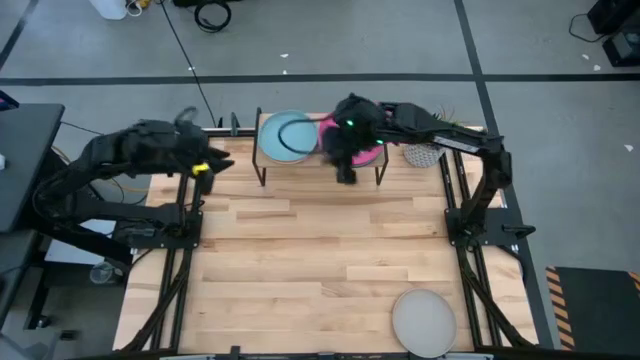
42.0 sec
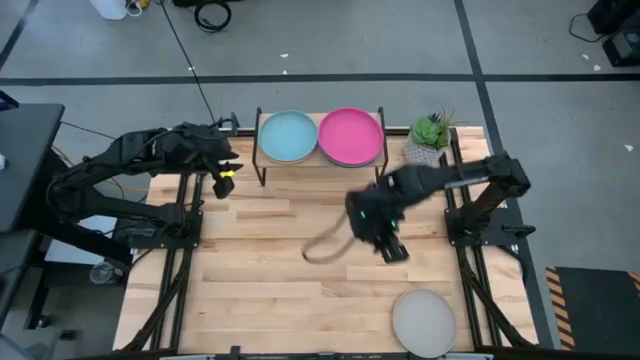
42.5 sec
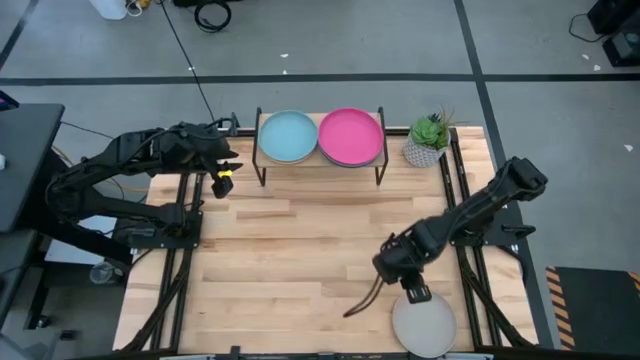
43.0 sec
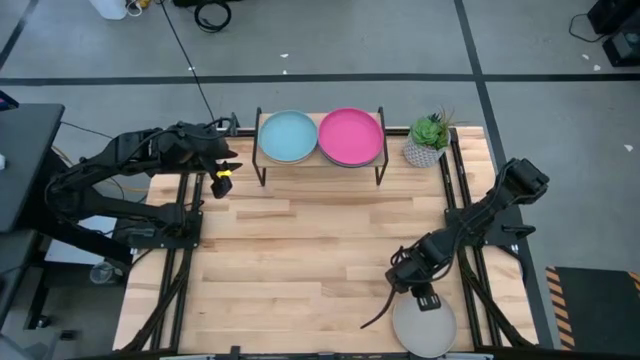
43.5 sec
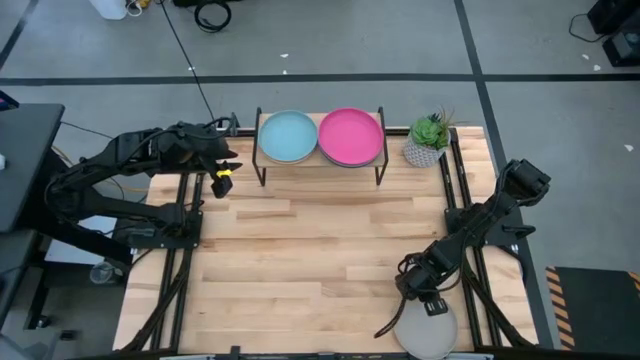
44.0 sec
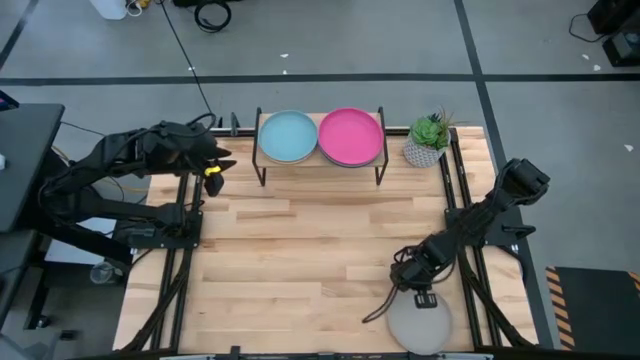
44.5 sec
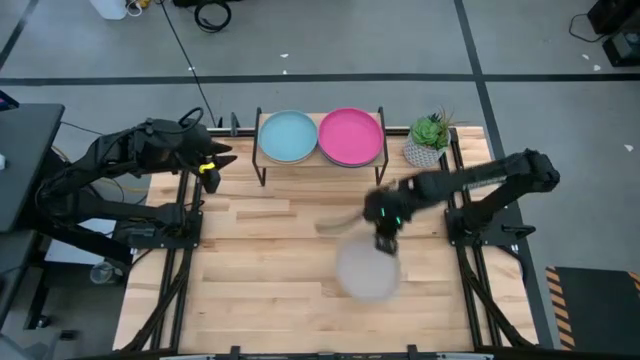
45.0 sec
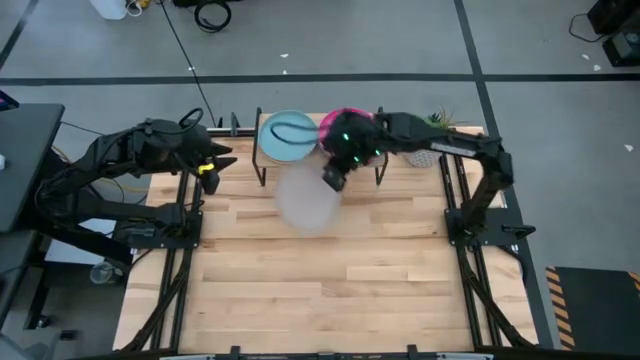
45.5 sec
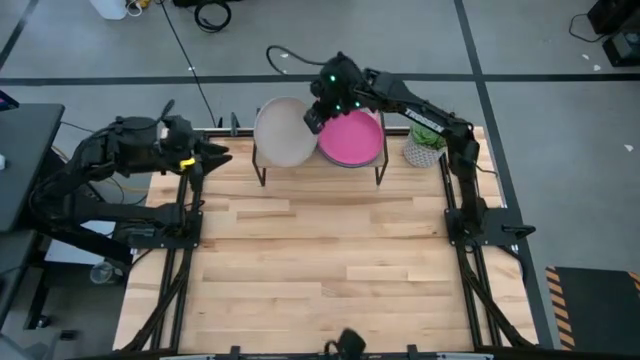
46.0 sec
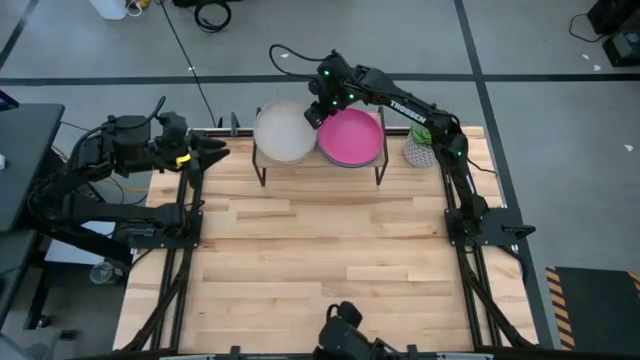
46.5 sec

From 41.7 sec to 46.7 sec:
Task: Place and stack plates onto a shelf
Stack the gray plate on top of the light blue plate on the shelf

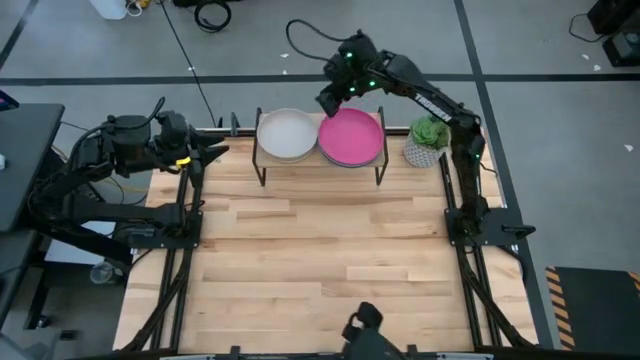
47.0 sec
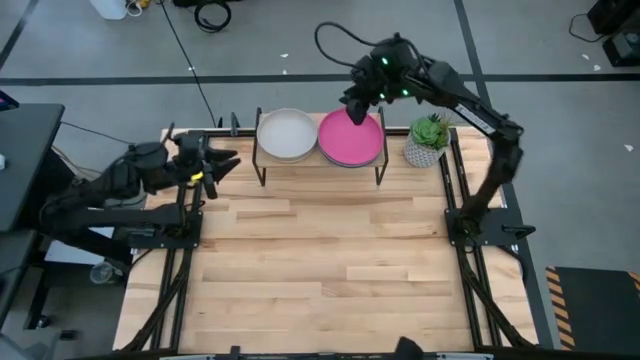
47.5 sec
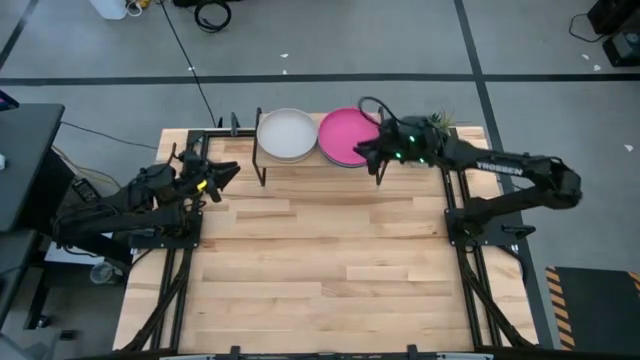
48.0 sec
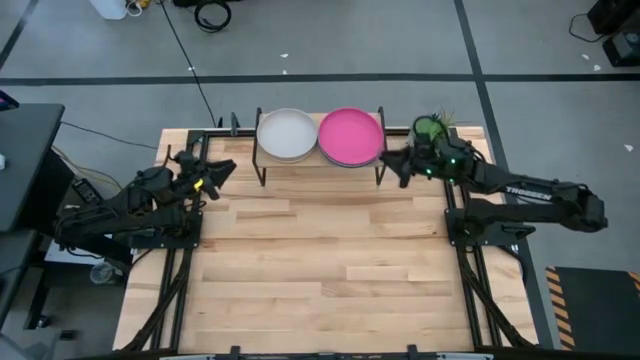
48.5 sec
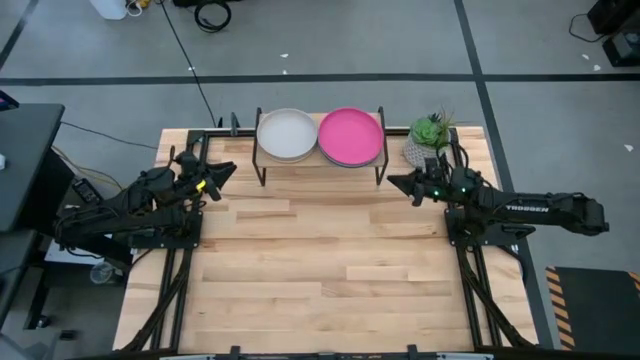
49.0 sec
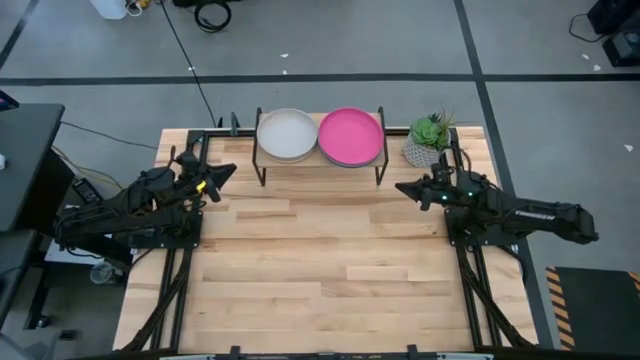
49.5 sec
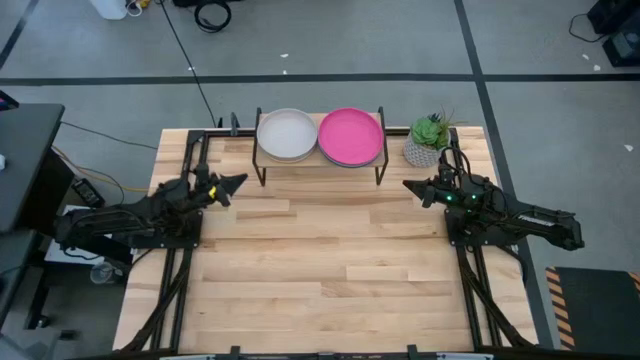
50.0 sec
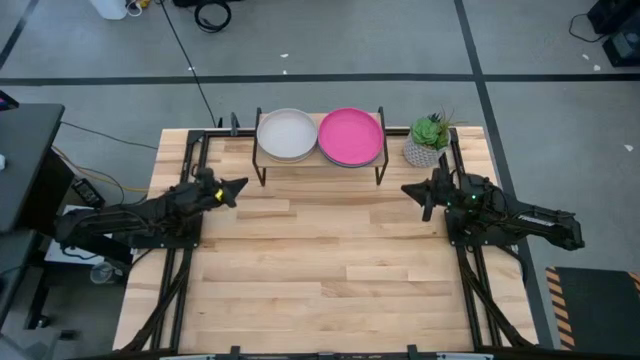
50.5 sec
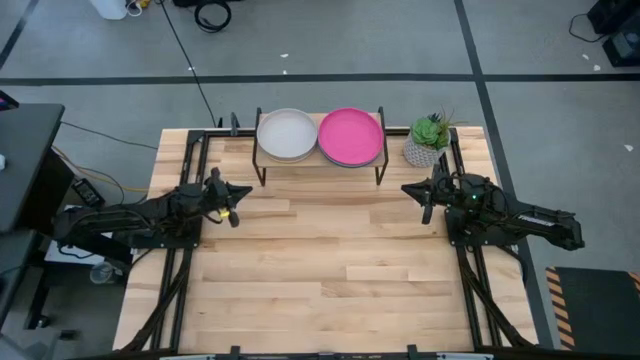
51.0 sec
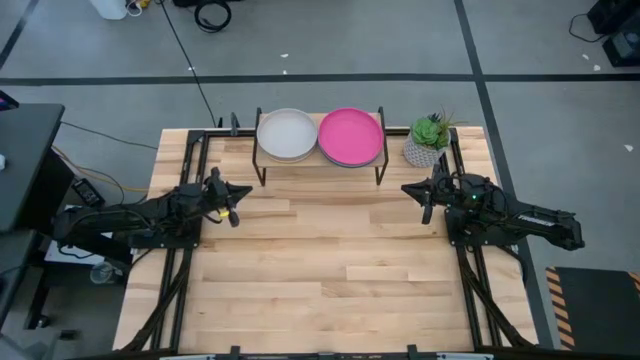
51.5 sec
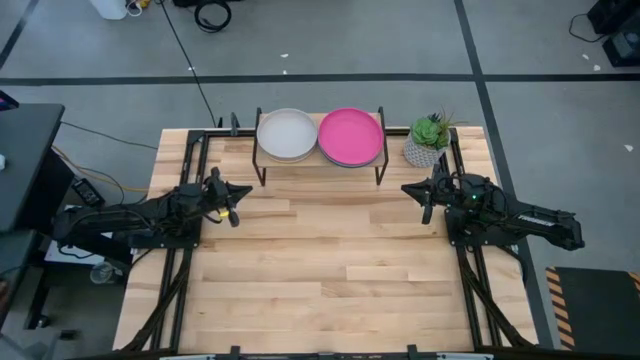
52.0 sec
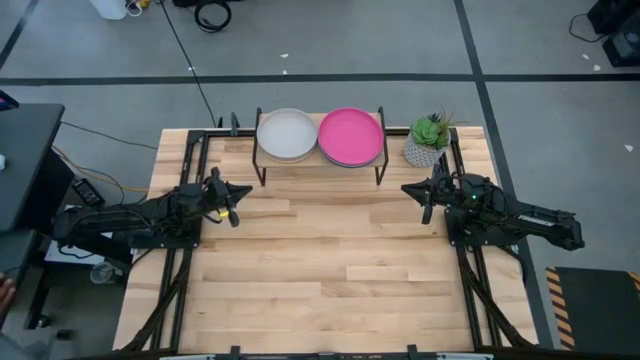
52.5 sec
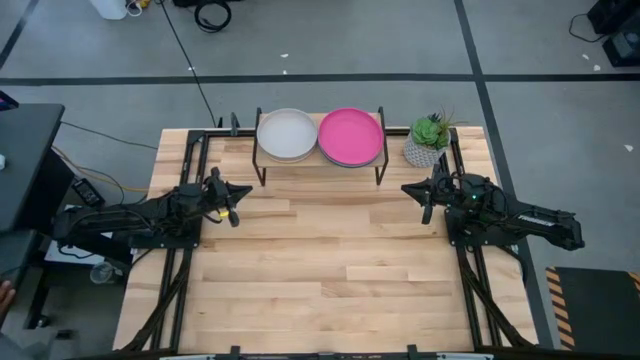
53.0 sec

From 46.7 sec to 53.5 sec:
Return to Home Position

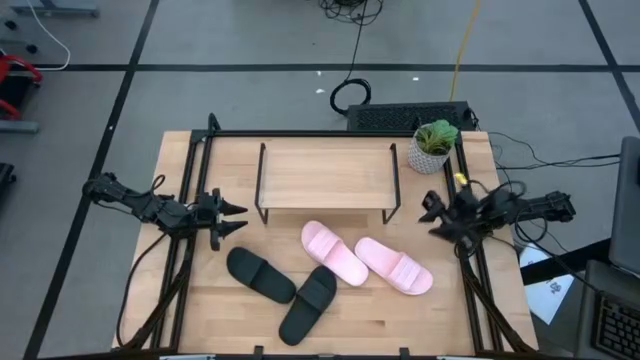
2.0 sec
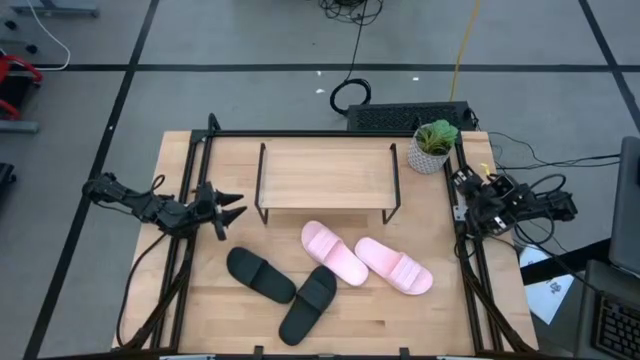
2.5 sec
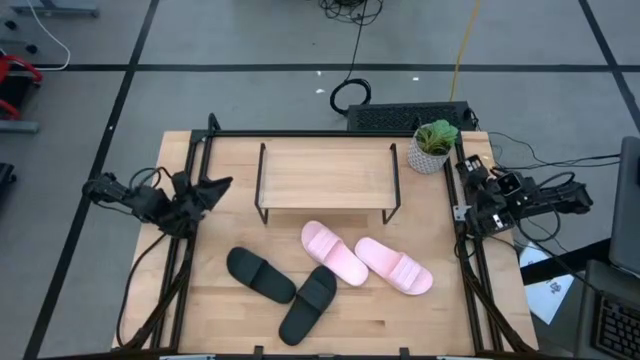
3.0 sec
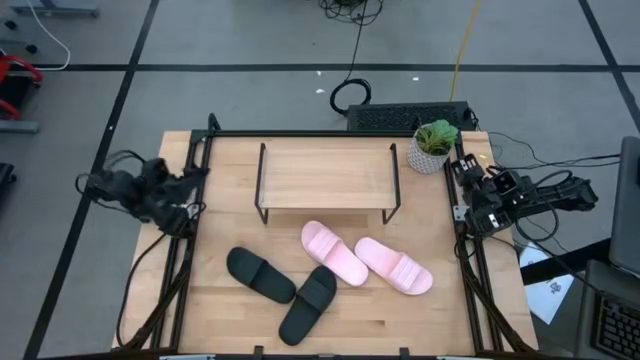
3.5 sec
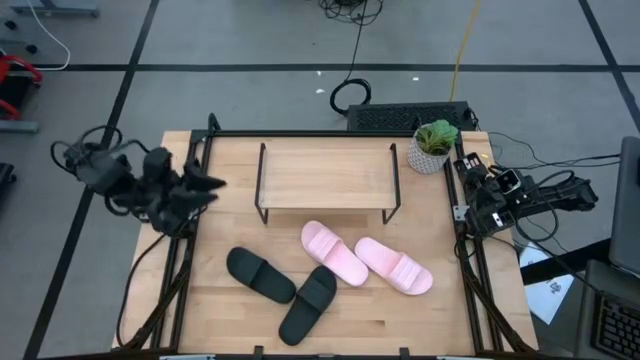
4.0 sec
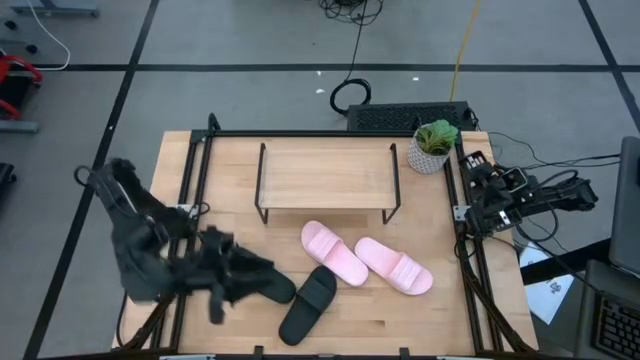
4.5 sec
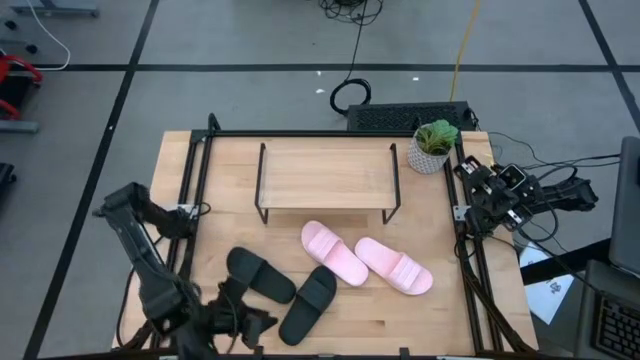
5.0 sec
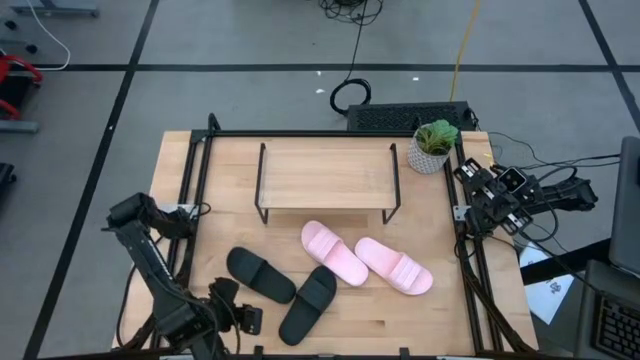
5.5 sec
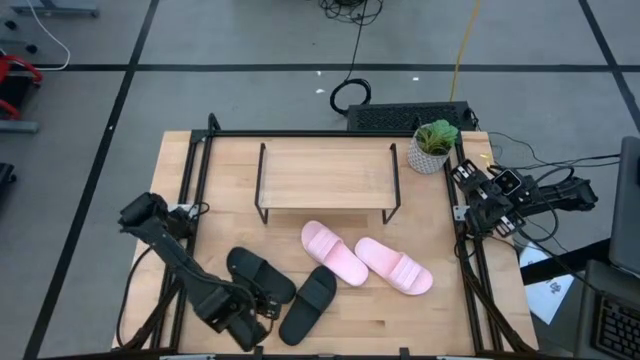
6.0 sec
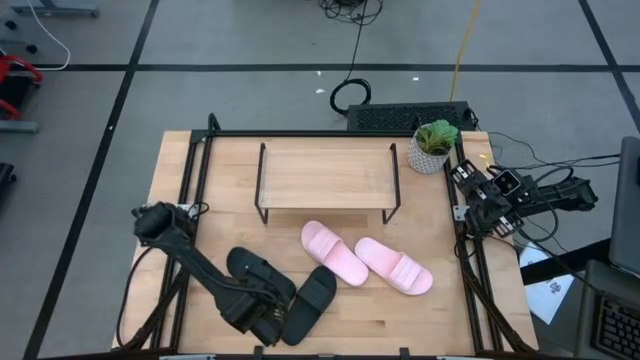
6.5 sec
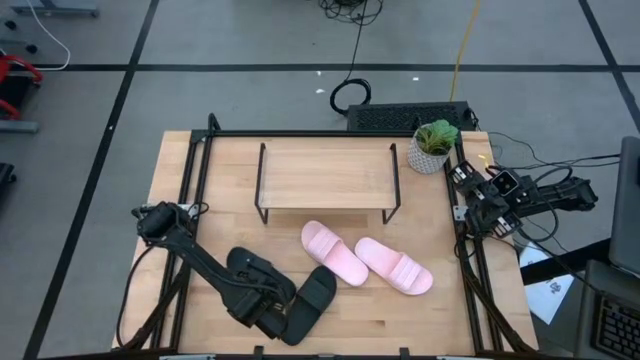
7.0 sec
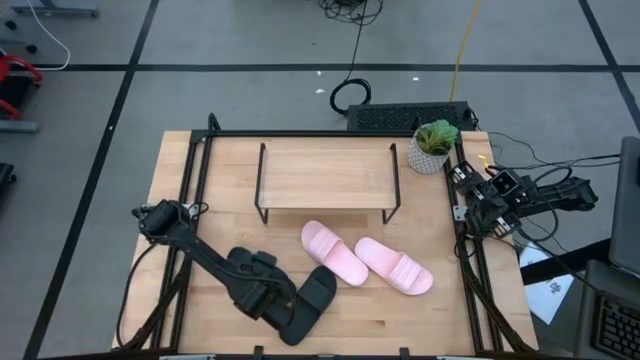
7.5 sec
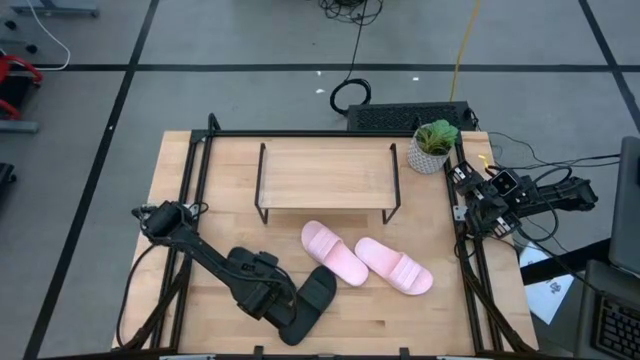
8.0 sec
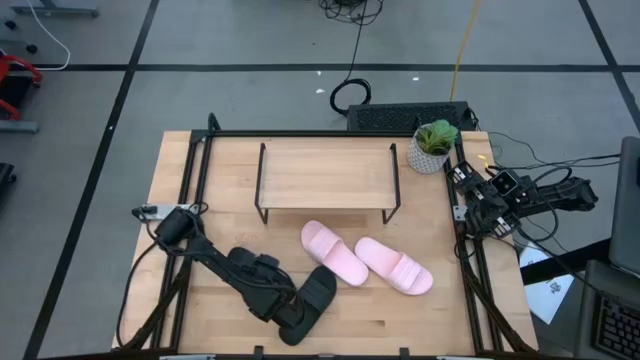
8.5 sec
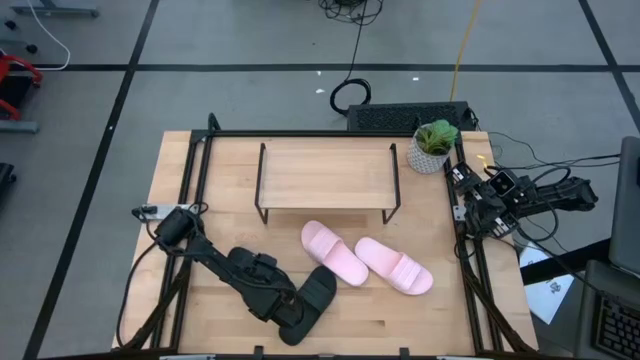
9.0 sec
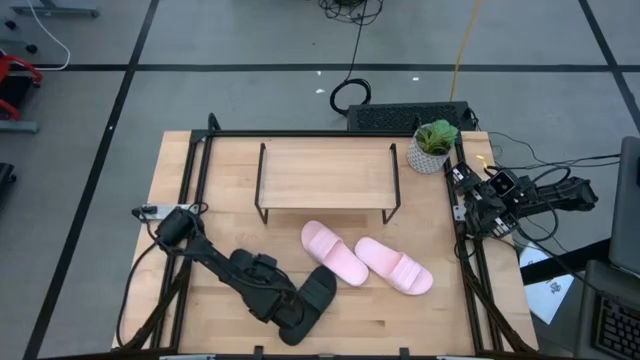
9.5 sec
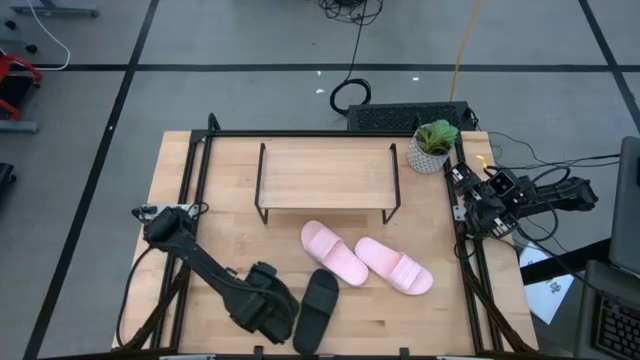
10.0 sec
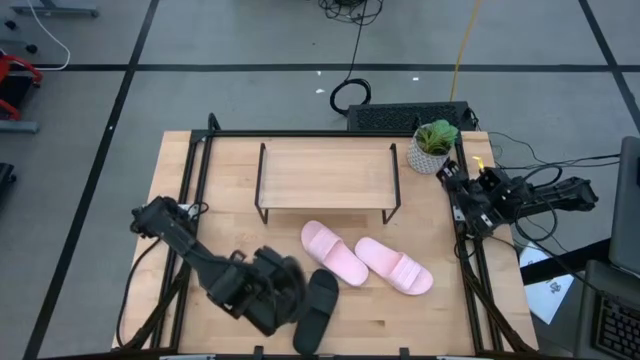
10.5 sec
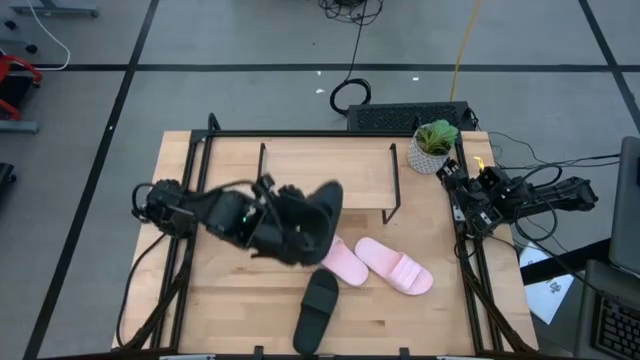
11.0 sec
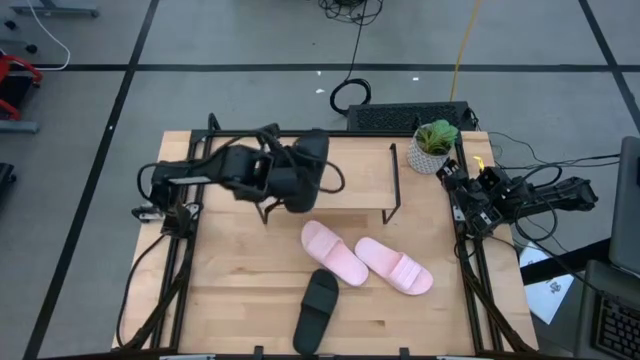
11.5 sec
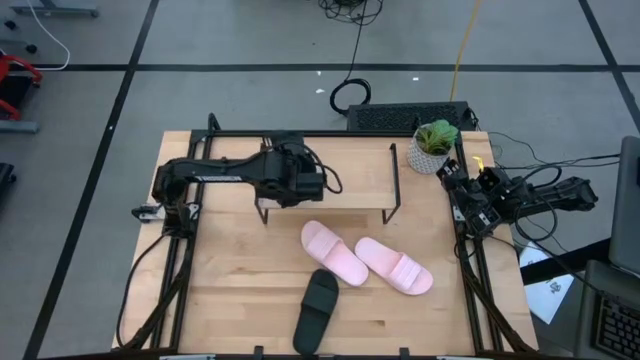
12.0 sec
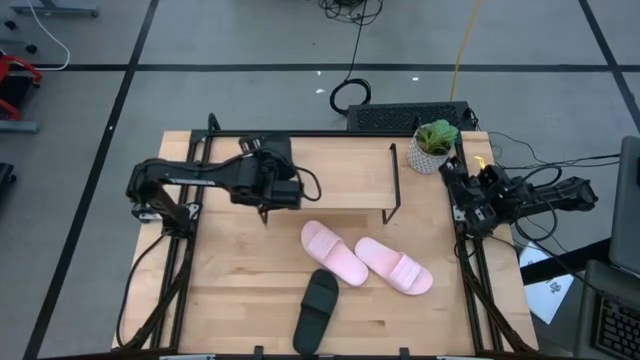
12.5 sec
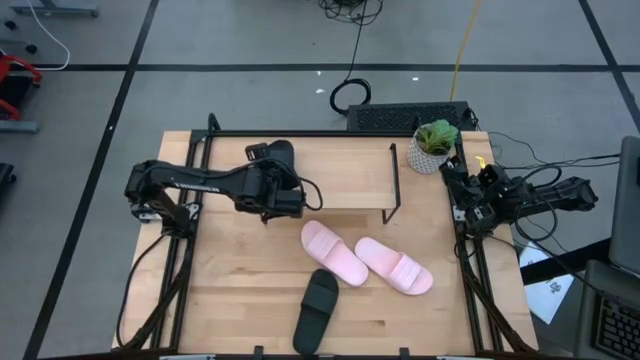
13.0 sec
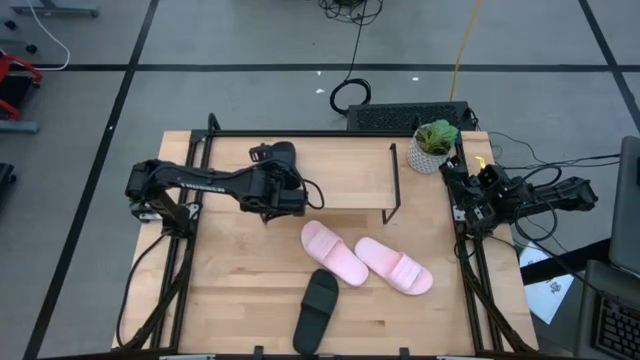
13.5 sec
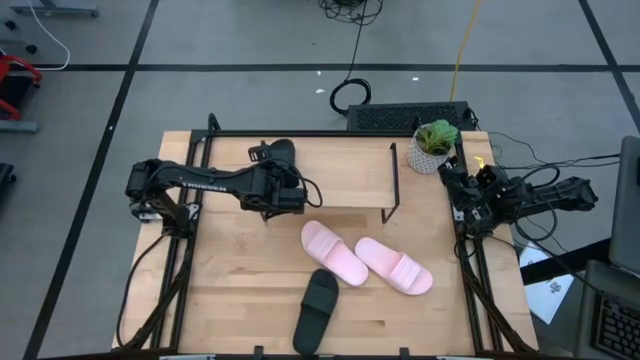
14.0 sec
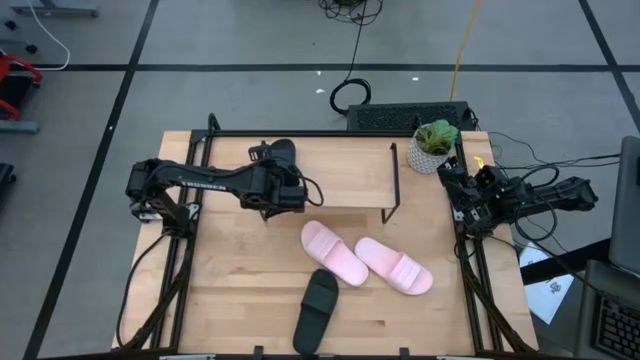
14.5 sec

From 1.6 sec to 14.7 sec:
Task: Pick and place slides into the shelf
Put the left black slipper onto the shelf
